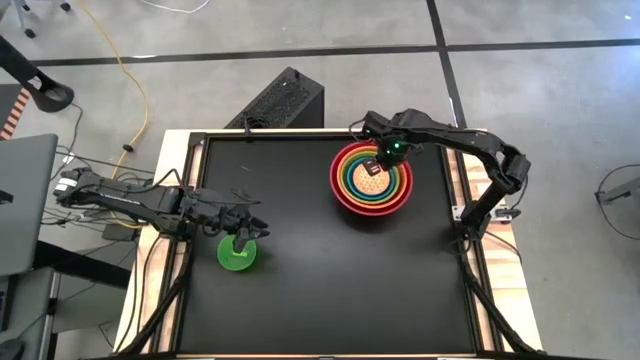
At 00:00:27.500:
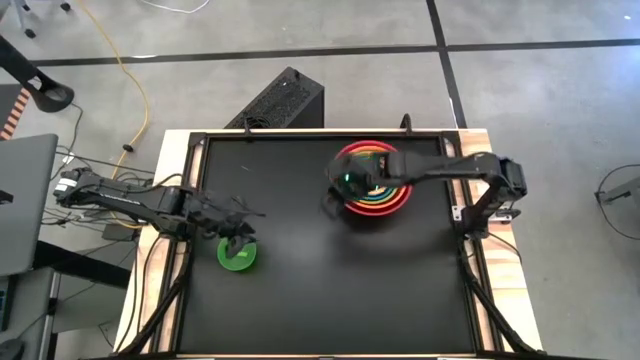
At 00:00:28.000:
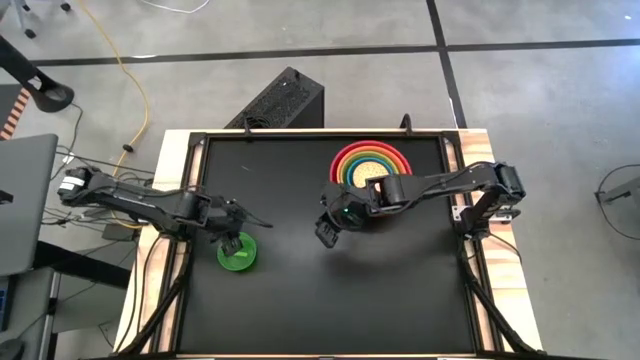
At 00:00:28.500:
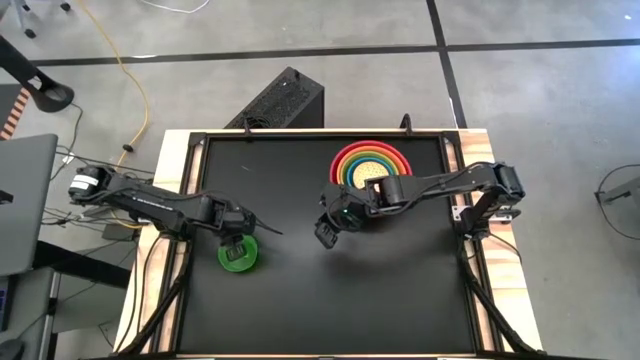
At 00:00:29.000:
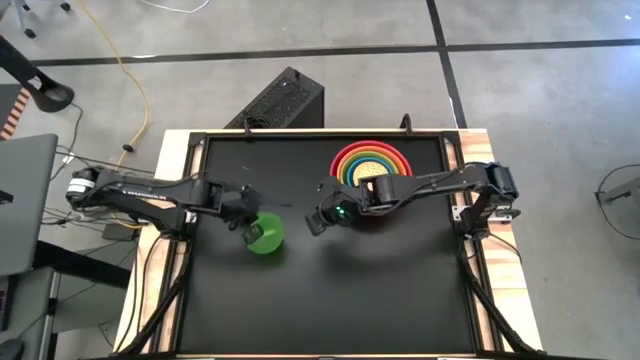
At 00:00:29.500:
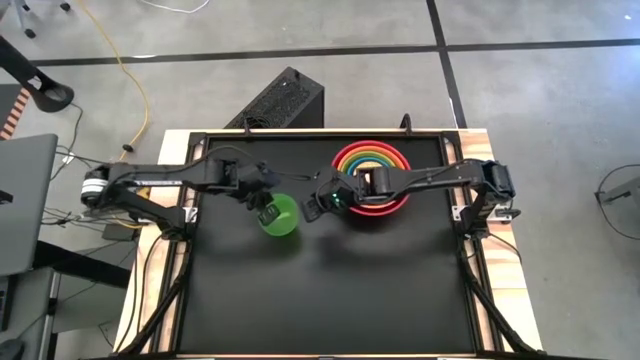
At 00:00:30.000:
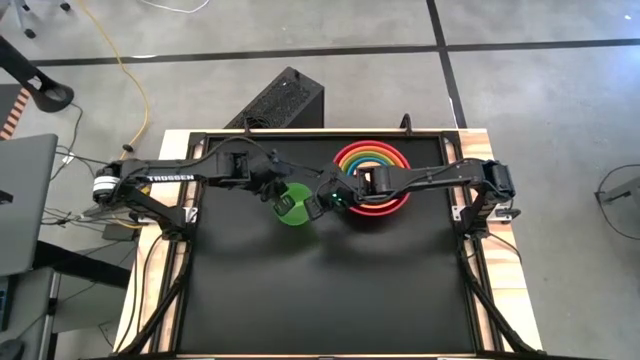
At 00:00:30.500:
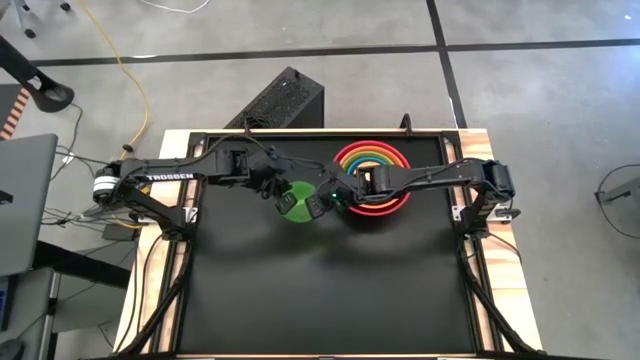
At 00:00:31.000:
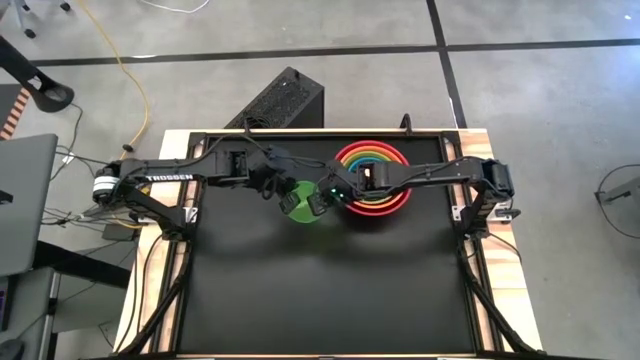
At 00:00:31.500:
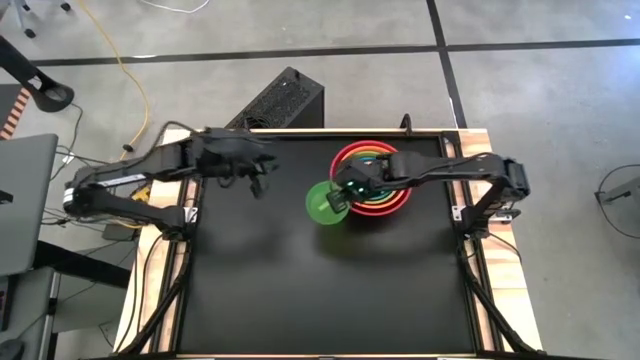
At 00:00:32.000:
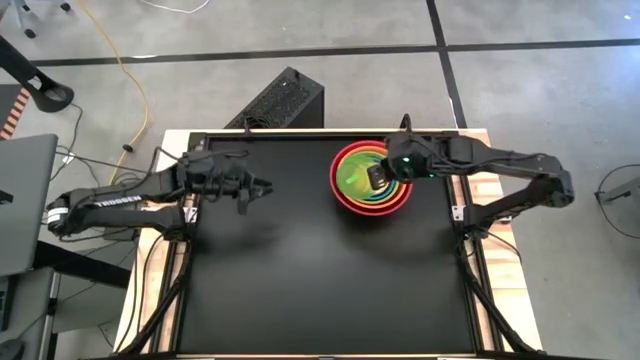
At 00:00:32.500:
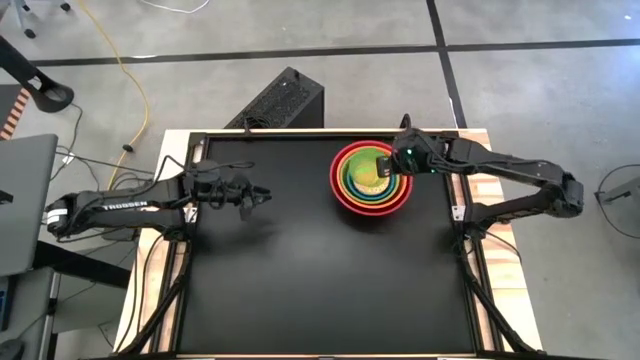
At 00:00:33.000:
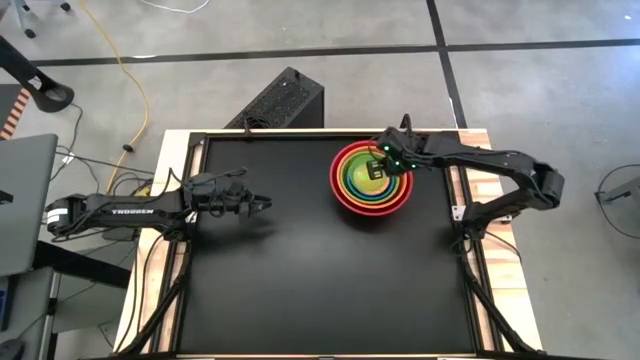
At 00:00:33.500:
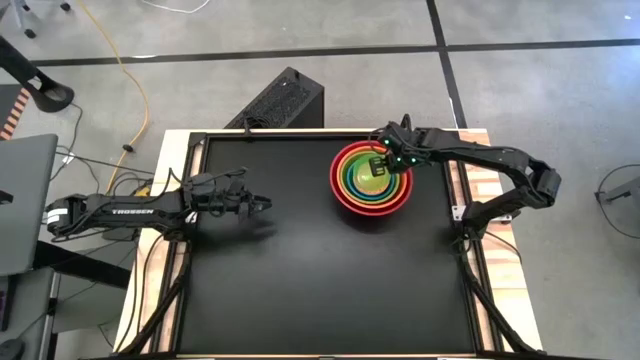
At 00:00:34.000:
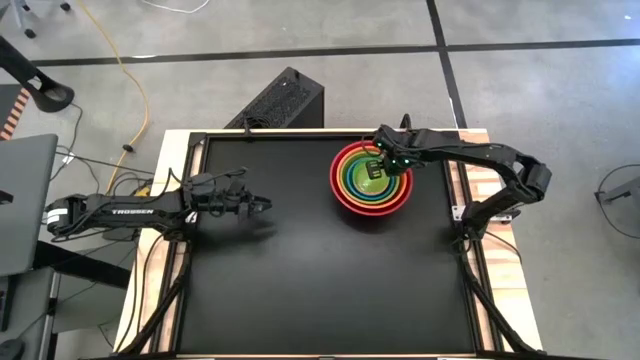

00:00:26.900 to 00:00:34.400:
Task: Nest bowls inside each other by size order
Stack the green transparent bowl on top of the orange patterned bowl

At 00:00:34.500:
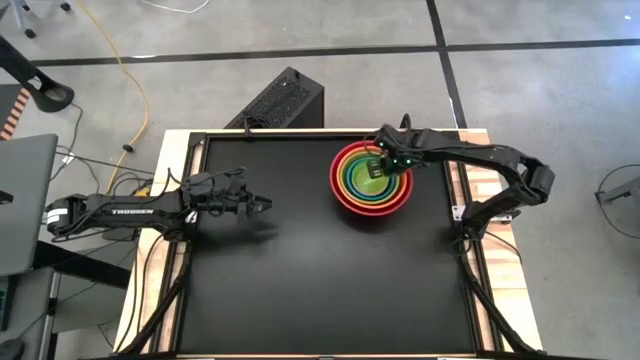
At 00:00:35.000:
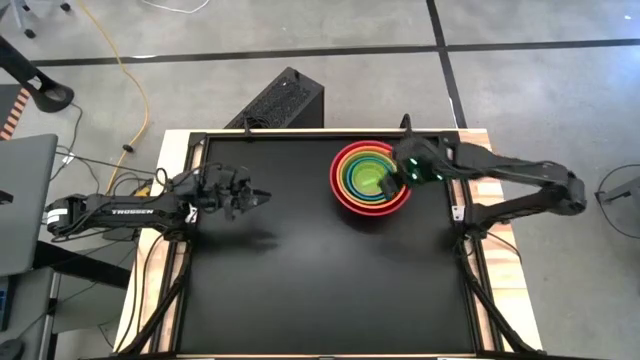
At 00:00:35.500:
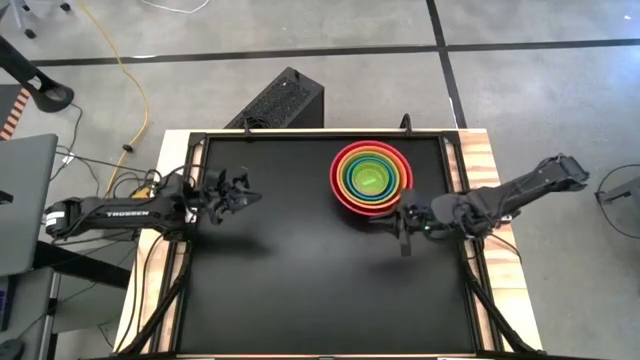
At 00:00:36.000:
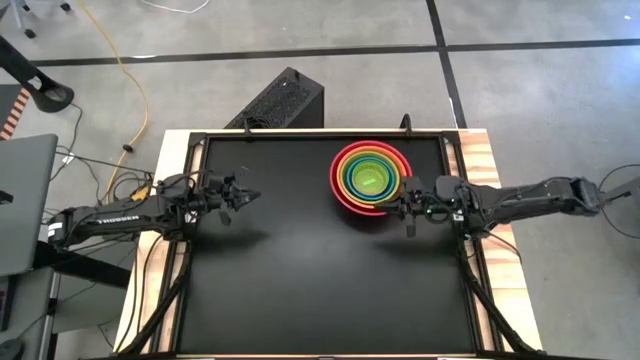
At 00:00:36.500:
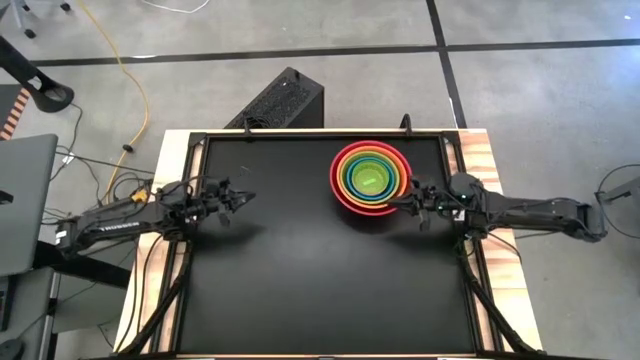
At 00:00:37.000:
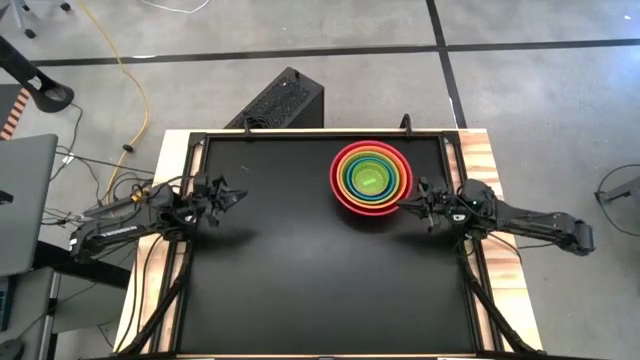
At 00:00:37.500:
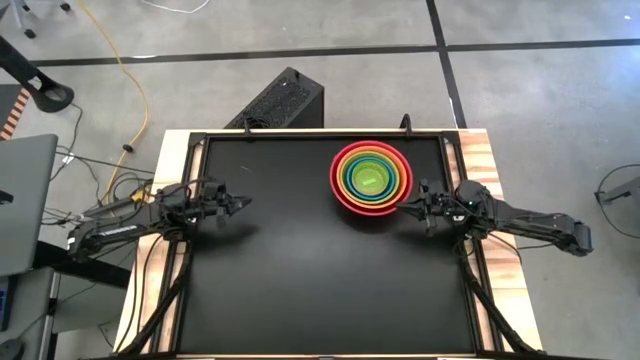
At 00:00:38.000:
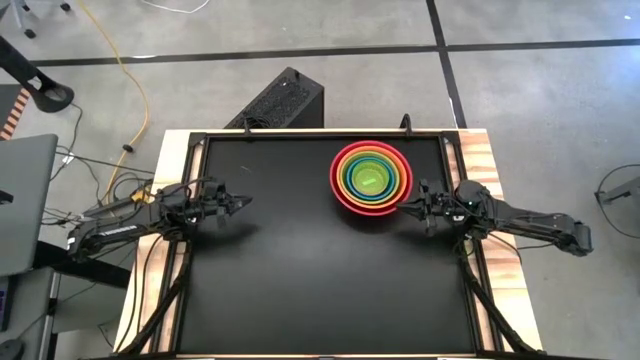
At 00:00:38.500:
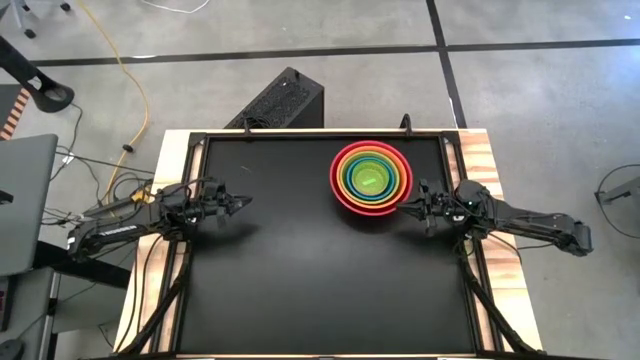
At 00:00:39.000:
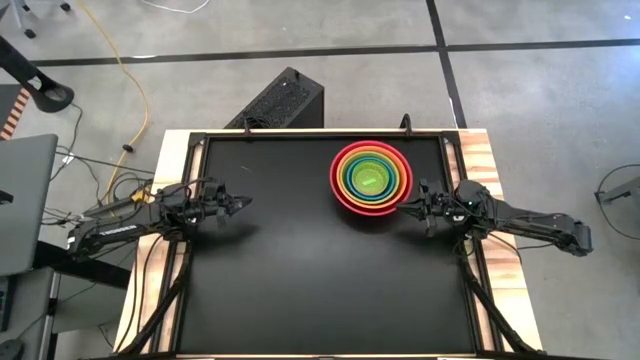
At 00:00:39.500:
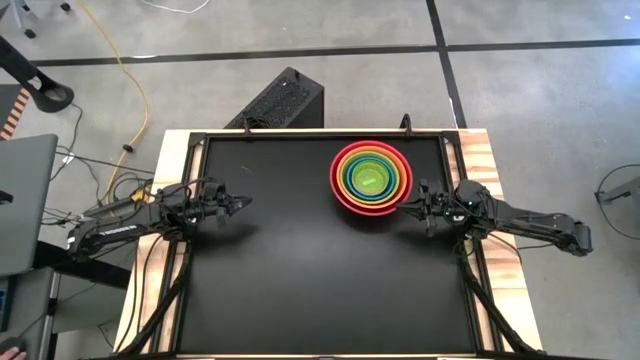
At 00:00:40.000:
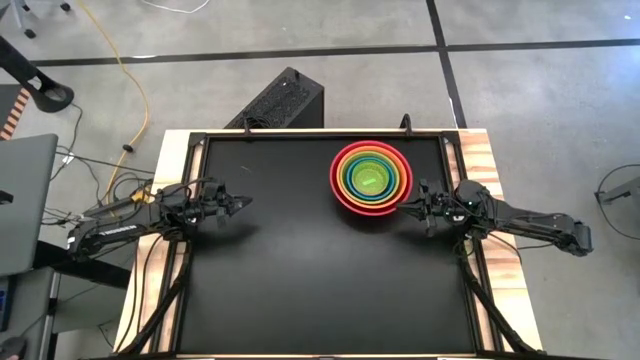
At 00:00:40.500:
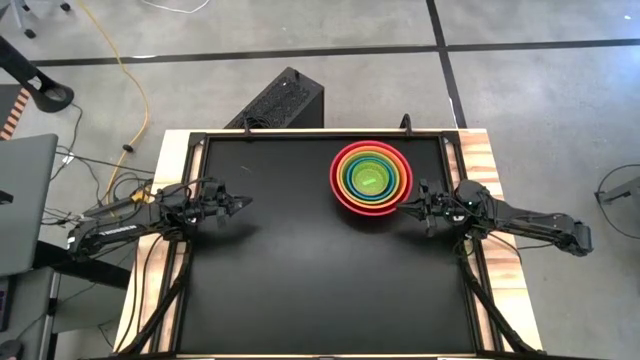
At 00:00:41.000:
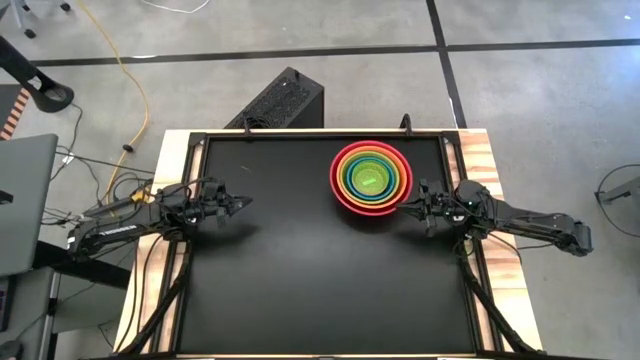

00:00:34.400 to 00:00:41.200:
Return to Home Position

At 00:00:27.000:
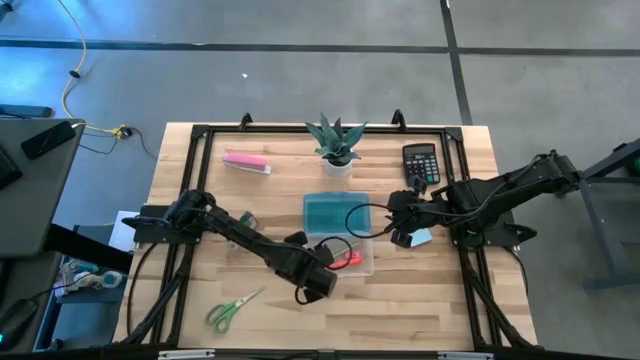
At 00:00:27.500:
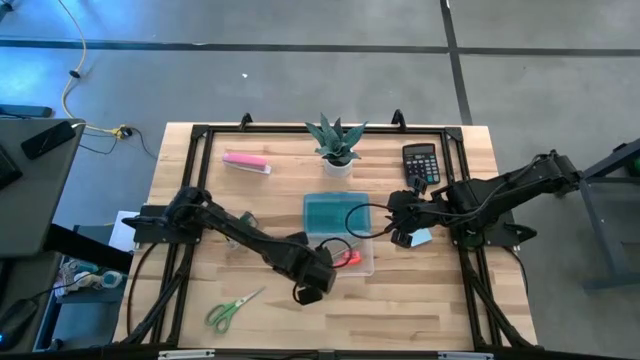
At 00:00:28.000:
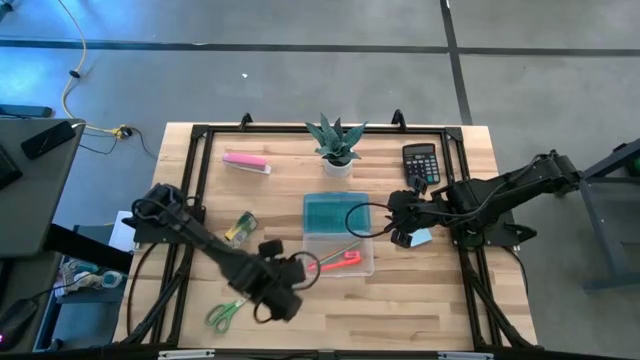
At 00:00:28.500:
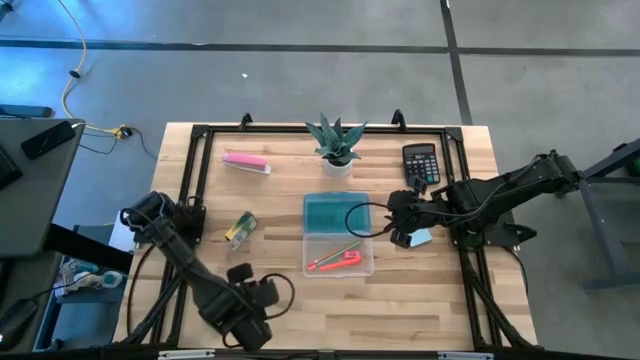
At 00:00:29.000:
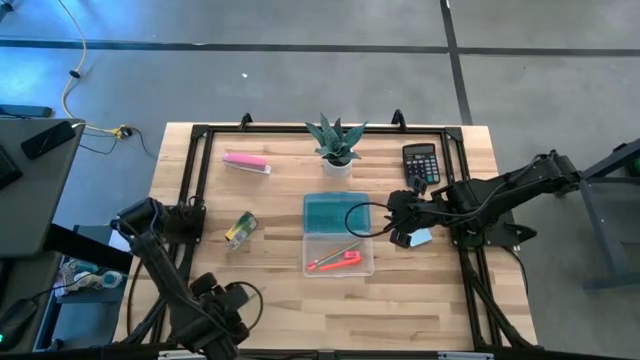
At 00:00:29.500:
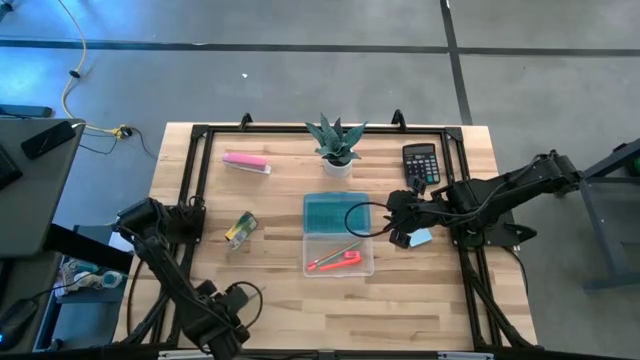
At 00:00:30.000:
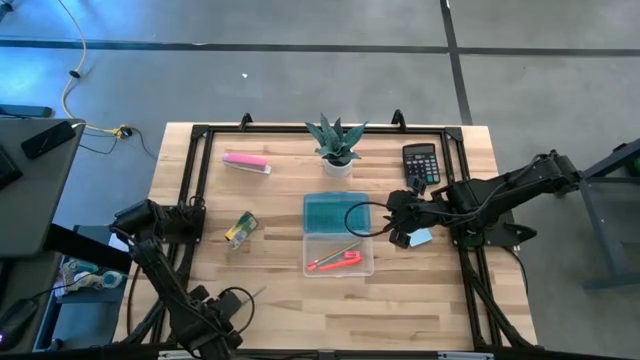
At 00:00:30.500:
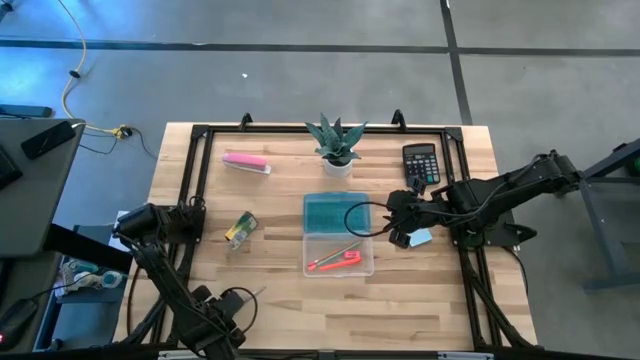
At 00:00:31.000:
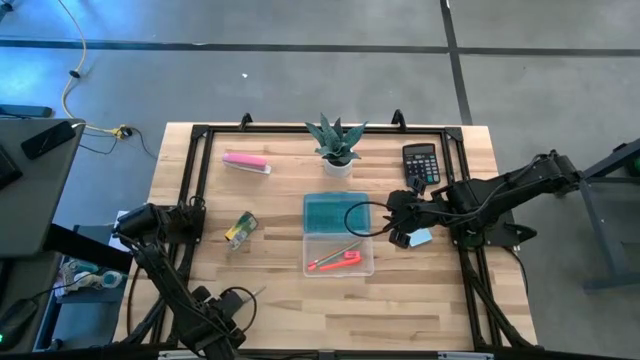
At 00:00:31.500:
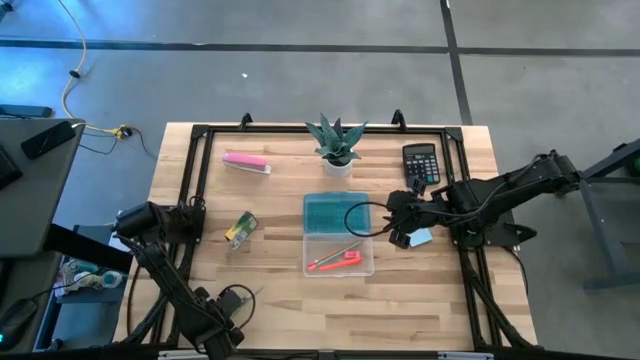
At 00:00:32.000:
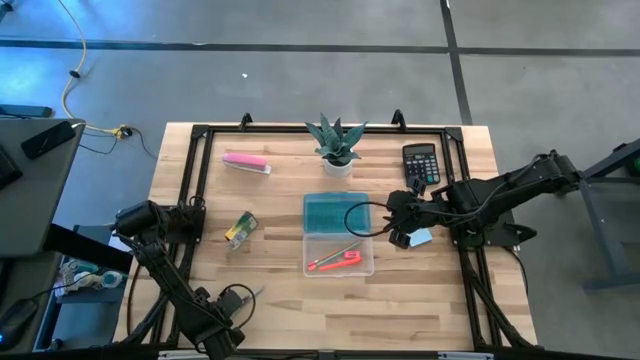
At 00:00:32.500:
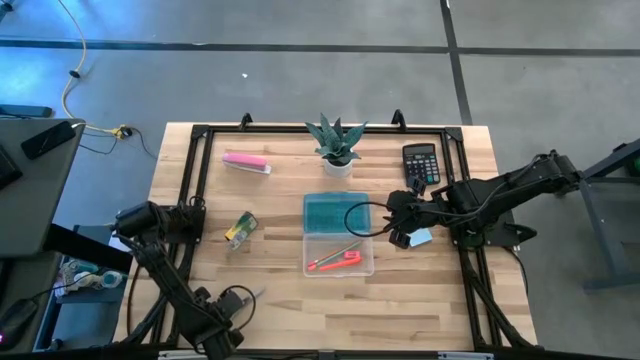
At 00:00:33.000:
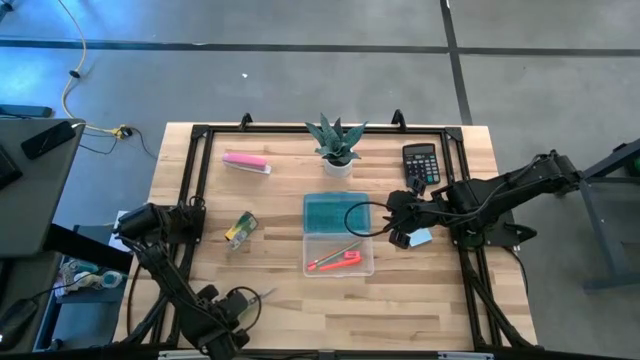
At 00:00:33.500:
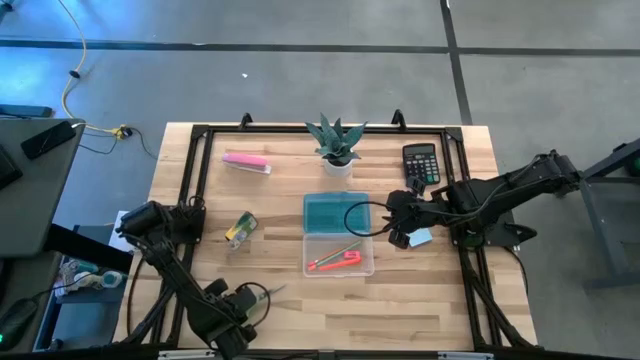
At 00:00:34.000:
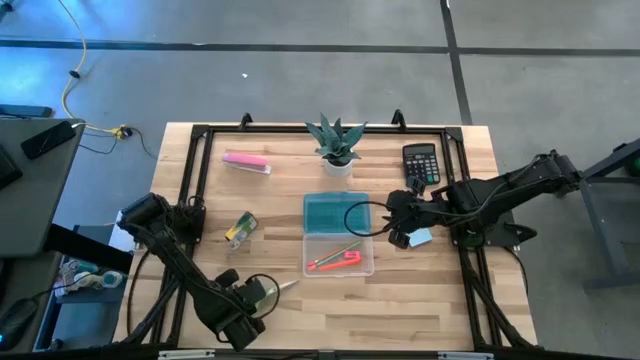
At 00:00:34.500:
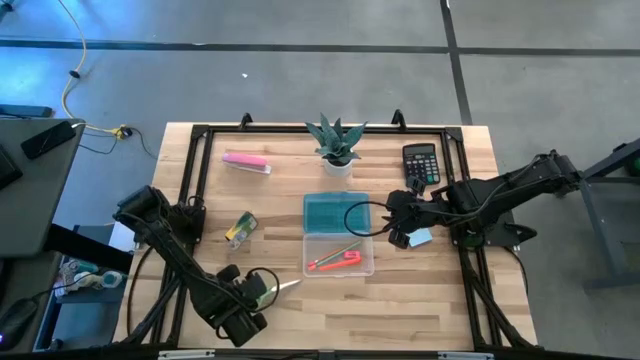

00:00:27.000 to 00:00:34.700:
Task: Pack school essentials
Put the green scissors into the blue supply box
